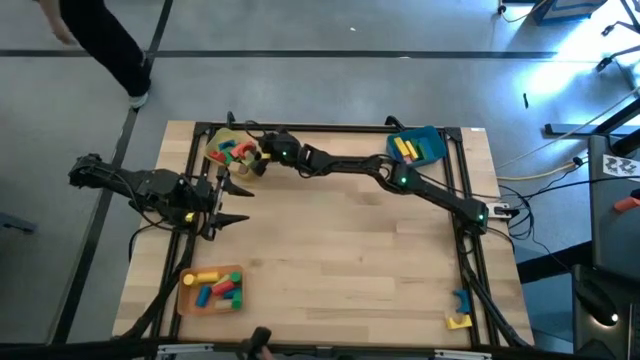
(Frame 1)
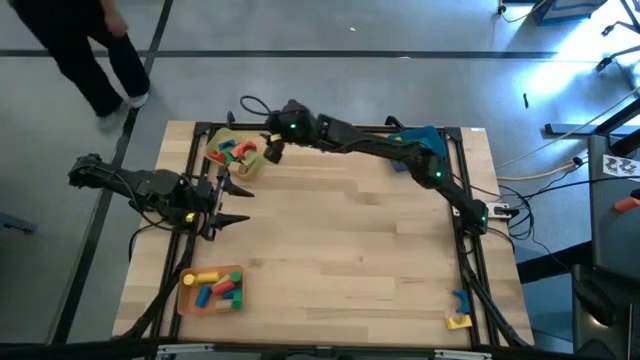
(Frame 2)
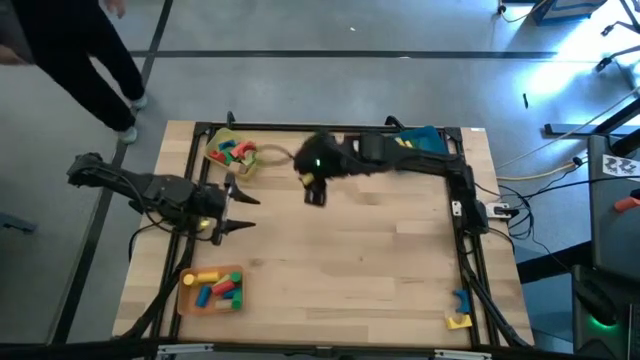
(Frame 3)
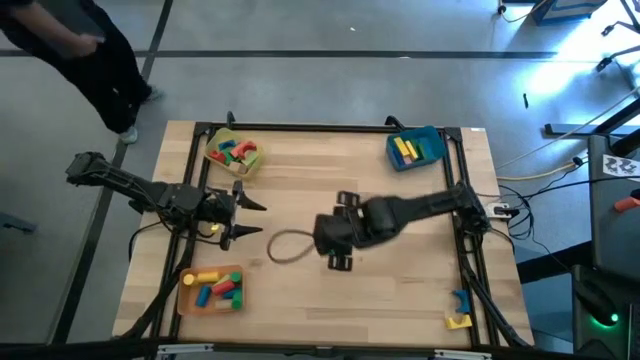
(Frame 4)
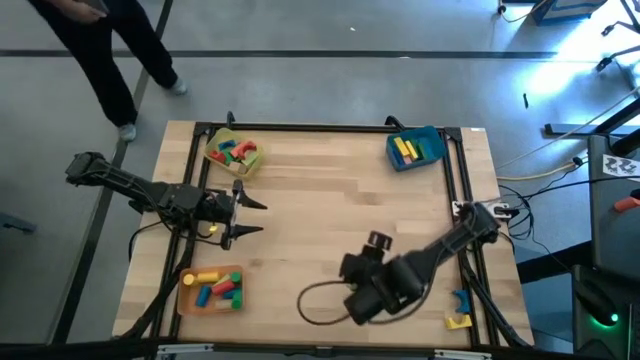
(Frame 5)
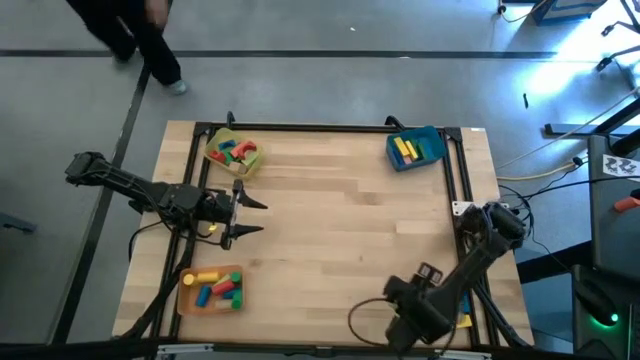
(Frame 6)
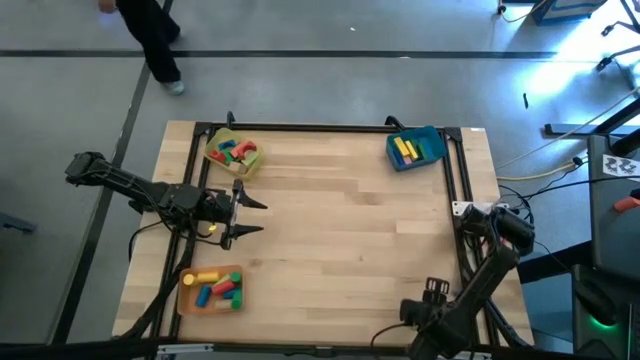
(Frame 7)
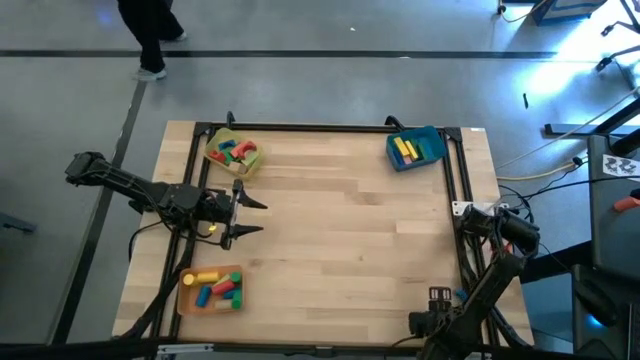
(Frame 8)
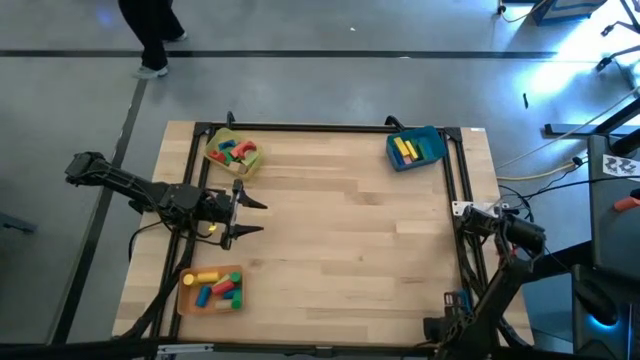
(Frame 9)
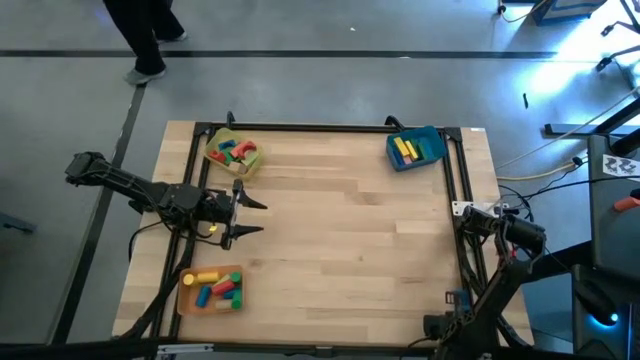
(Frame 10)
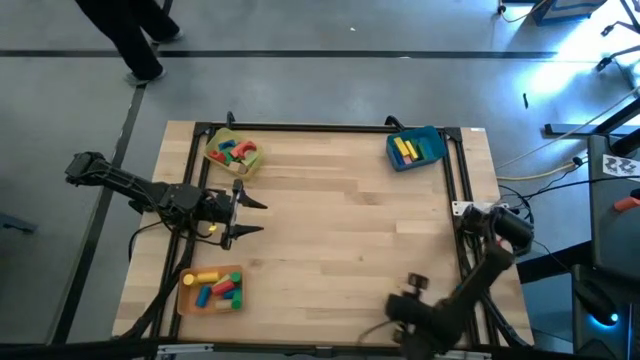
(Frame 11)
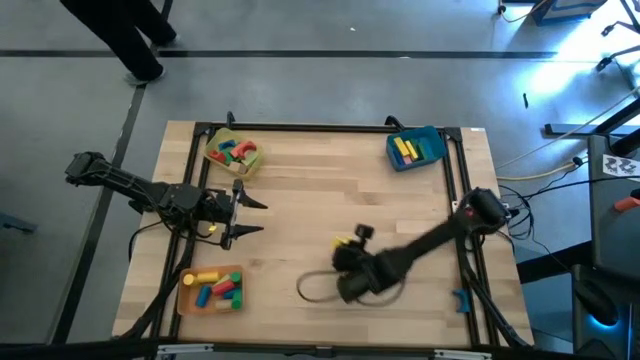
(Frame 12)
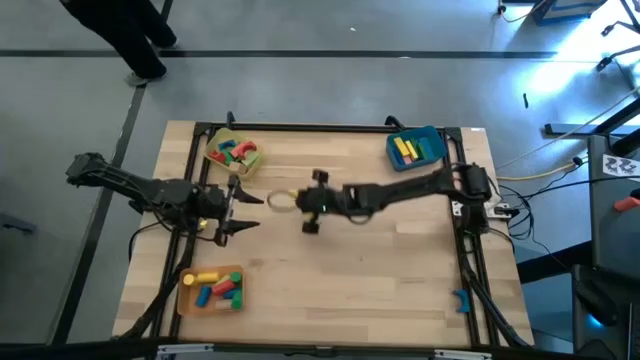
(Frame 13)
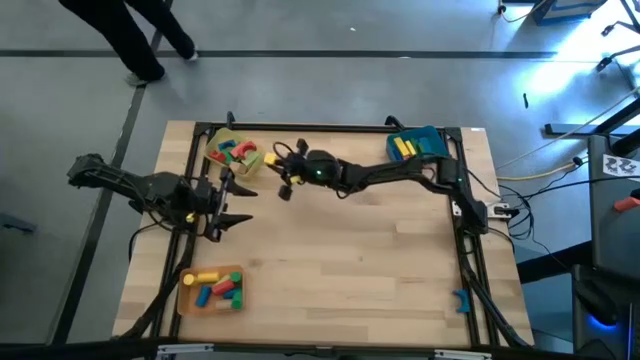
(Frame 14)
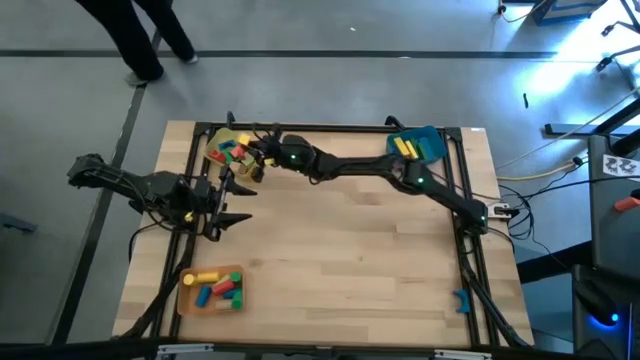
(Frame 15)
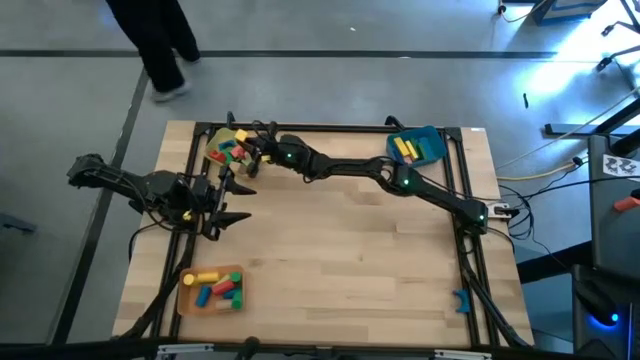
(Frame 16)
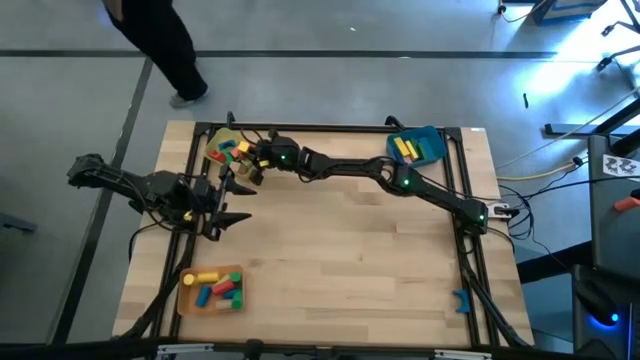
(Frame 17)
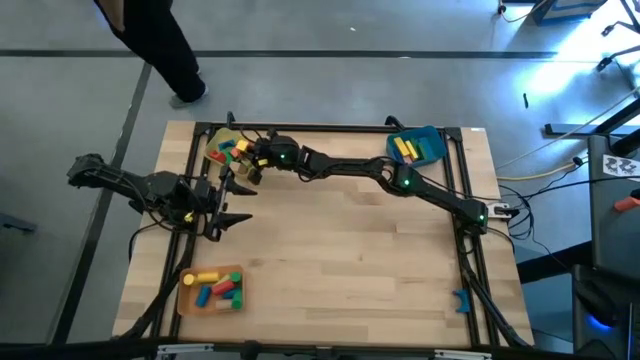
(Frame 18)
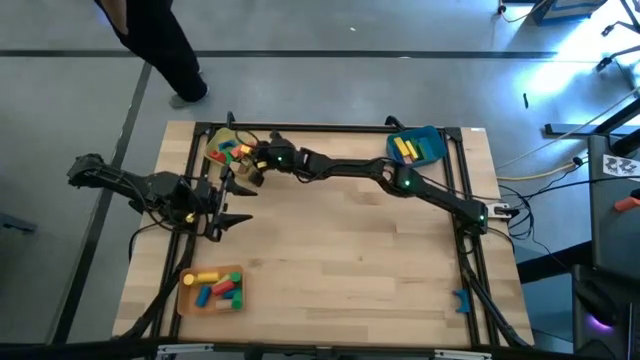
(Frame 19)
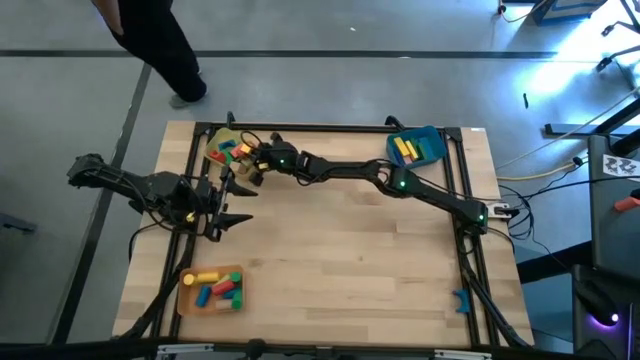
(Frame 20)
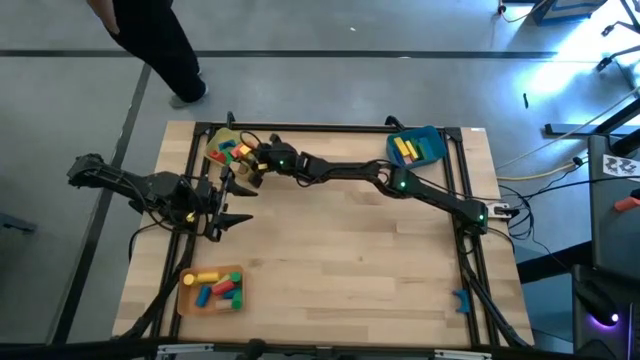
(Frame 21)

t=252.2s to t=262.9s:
Task: Sort blocks by size
Put the yellow arch block into the yellow bin

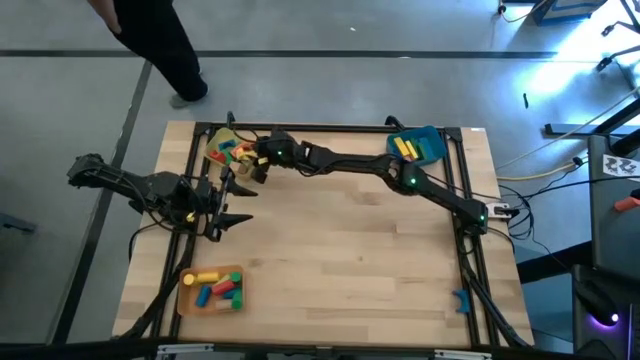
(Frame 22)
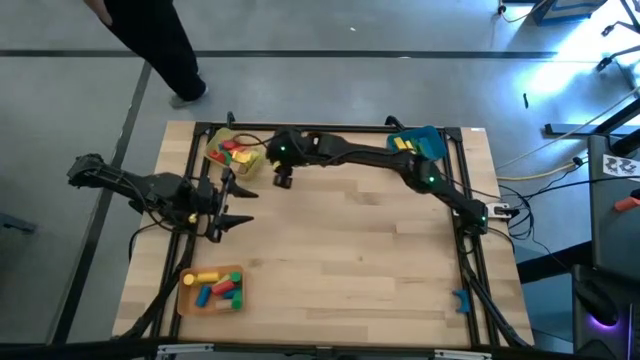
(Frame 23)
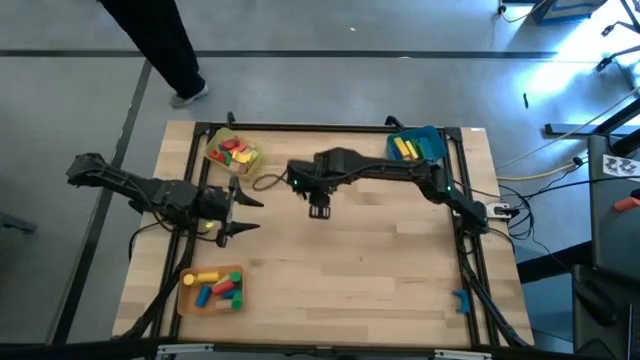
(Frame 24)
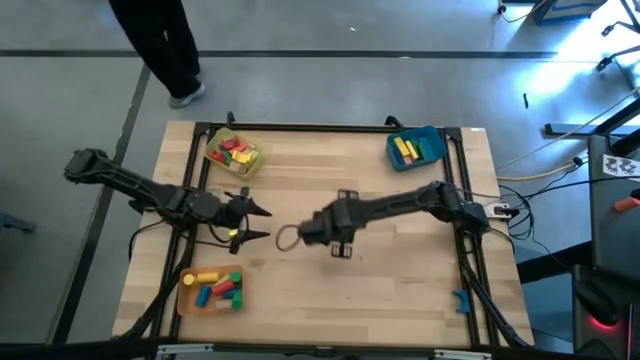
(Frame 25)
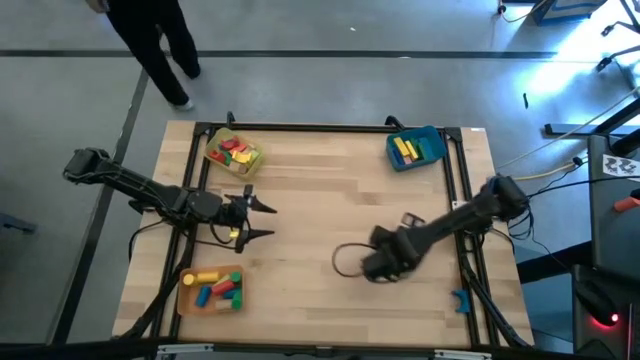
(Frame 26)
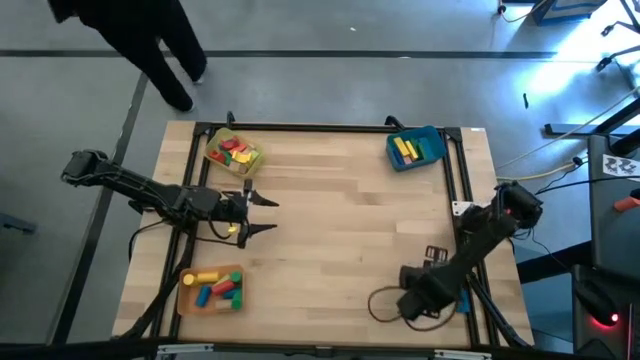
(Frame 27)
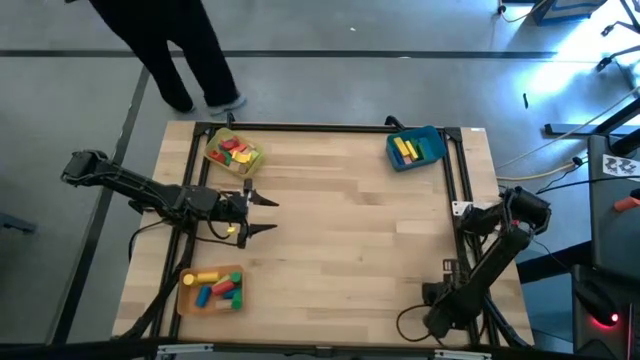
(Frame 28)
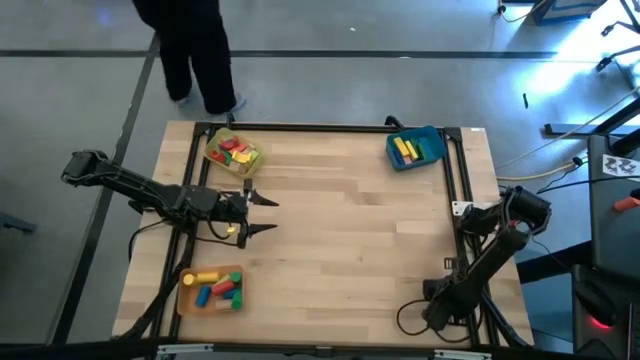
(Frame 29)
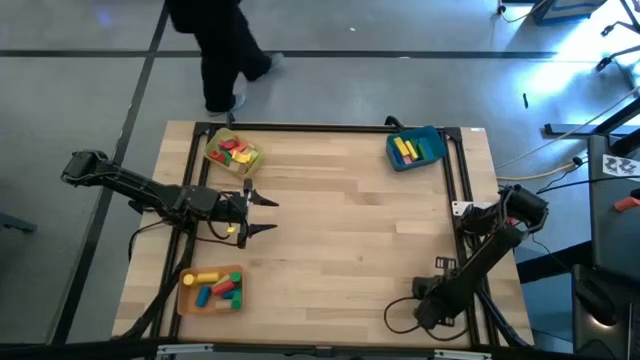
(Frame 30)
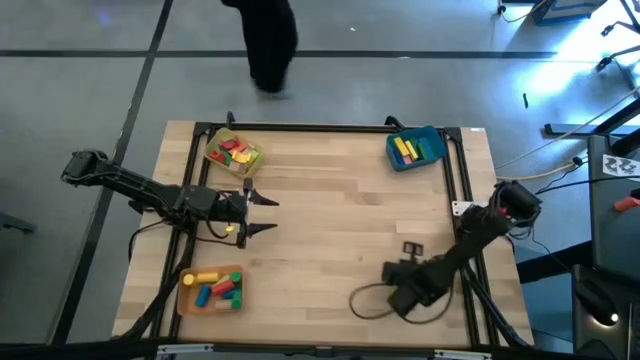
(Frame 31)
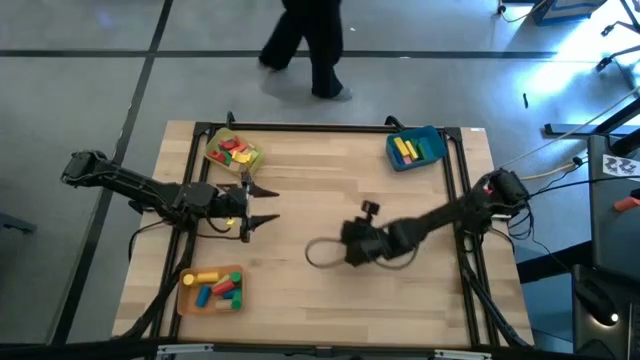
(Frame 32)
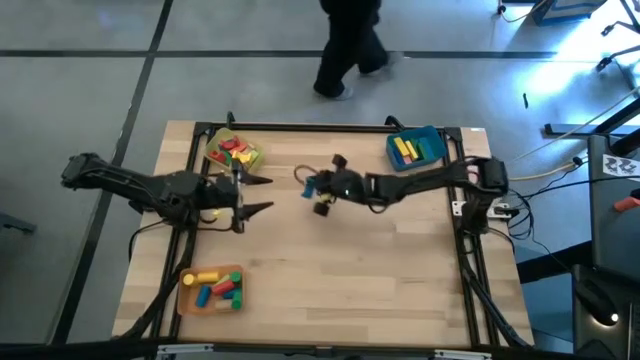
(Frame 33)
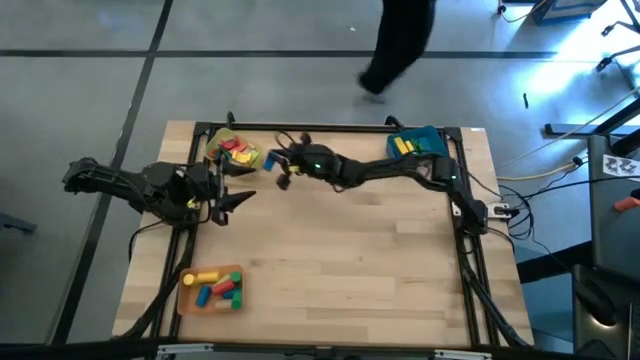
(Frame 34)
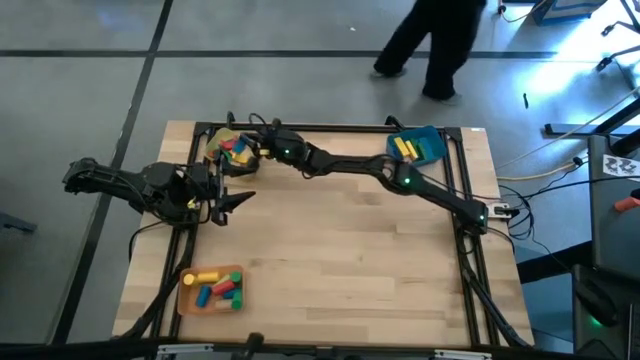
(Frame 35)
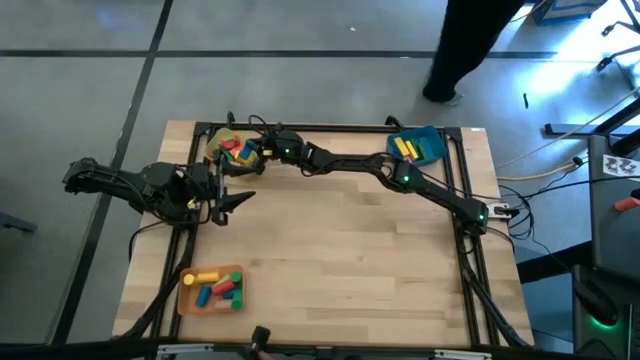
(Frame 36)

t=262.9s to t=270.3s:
Put the blue arch block into the yellow container

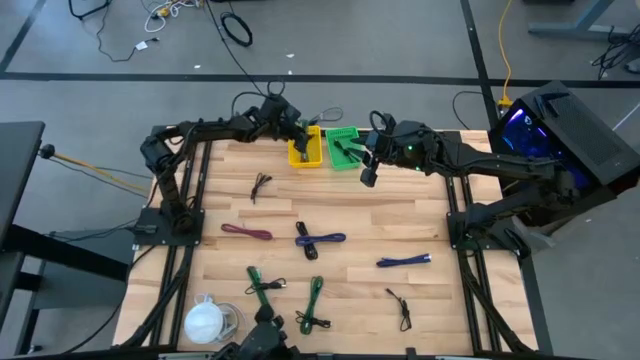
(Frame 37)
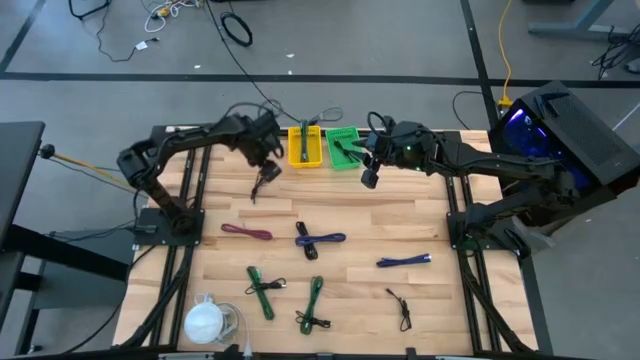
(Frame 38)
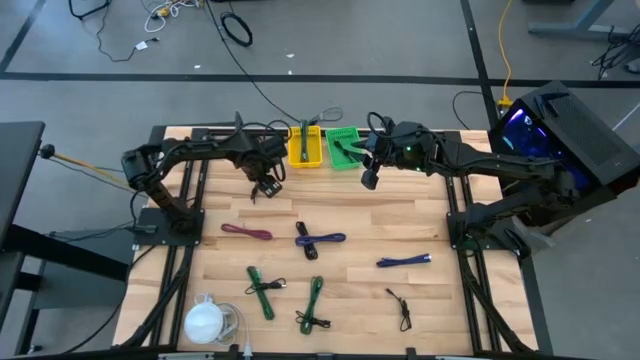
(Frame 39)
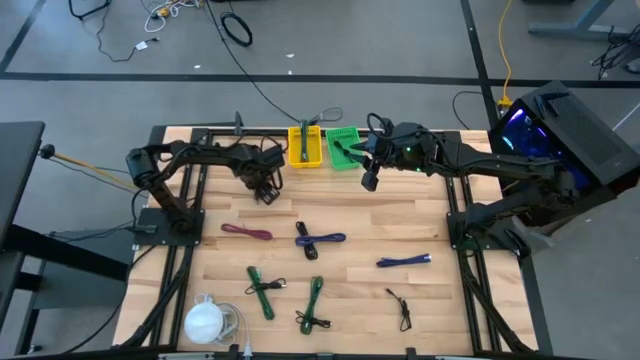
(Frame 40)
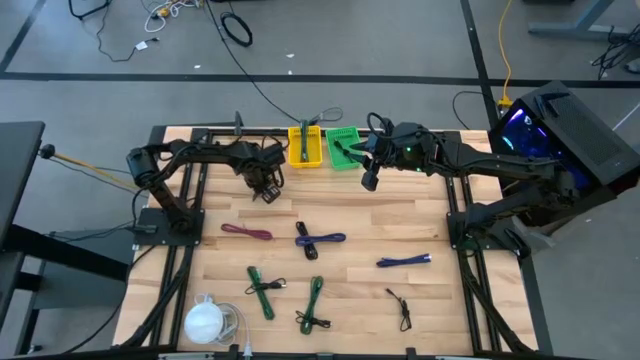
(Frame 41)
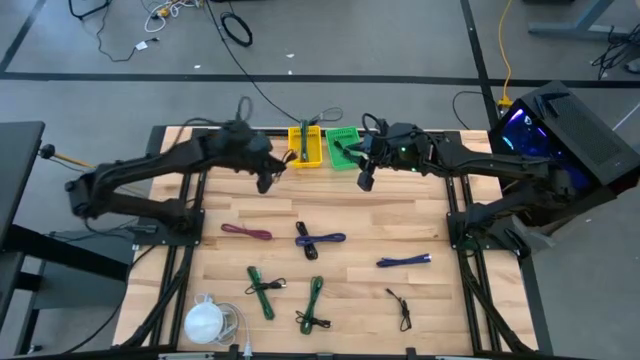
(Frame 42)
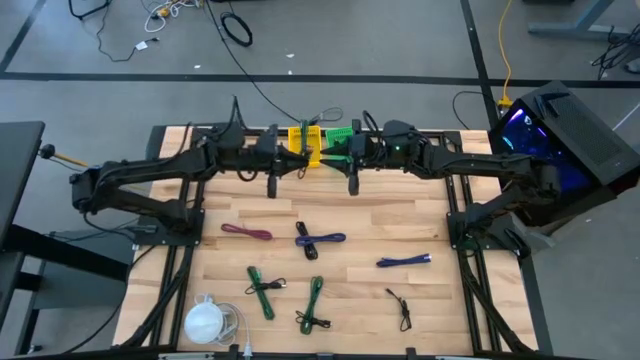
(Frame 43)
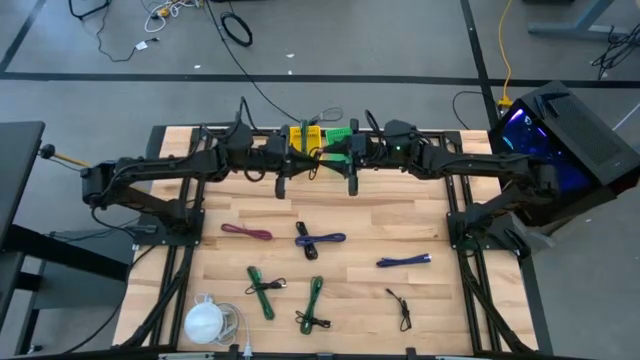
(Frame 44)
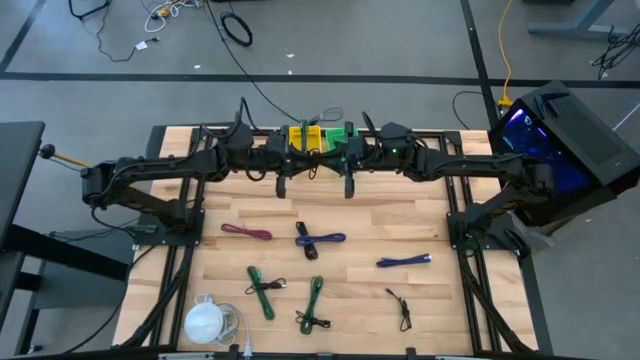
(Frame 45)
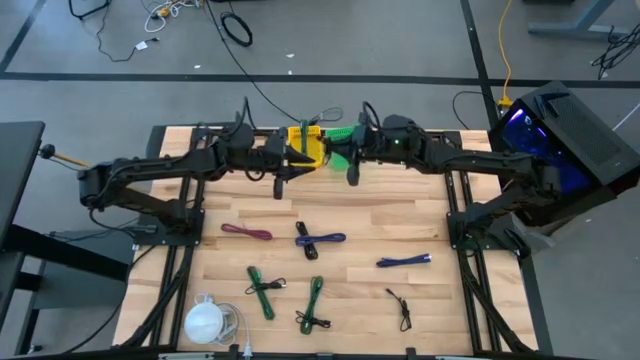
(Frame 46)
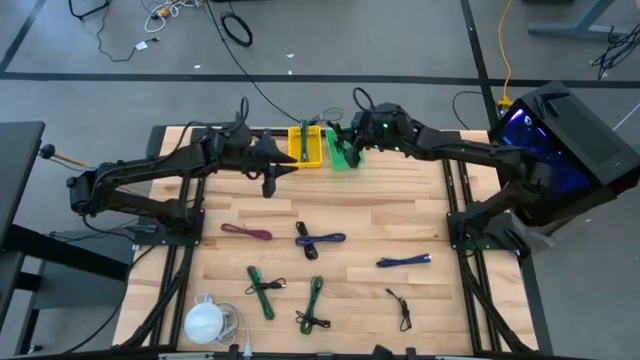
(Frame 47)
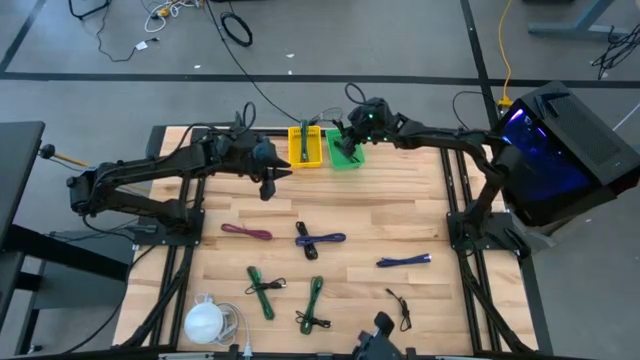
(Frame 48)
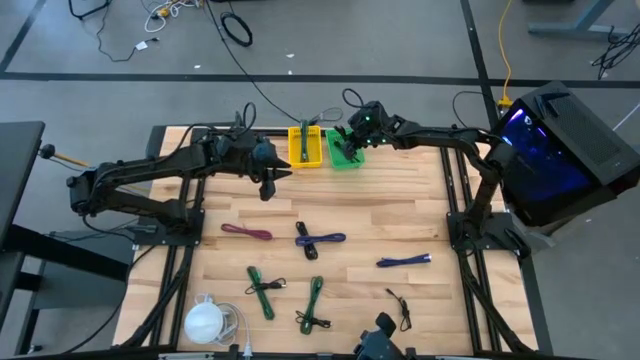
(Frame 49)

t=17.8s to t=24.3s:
Task: Pick & Place USB Port
Put the black usb cable into the green bin
